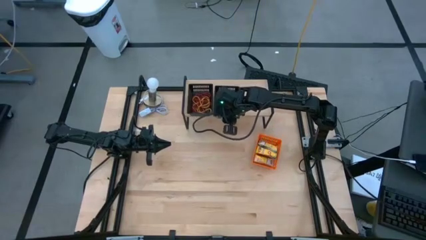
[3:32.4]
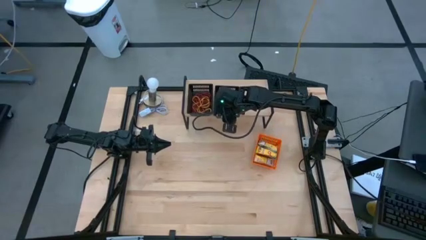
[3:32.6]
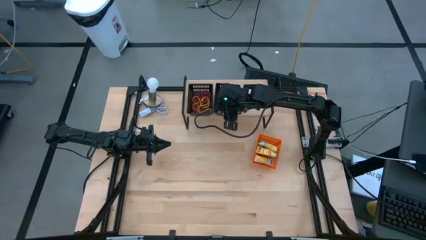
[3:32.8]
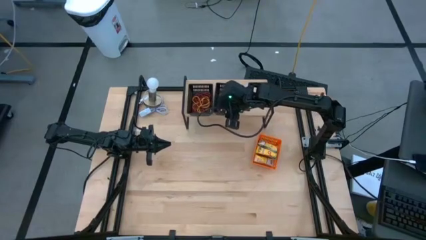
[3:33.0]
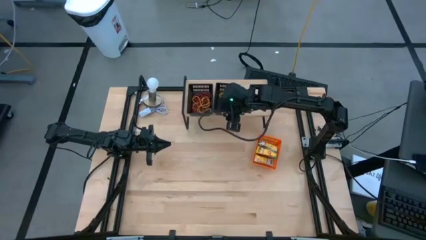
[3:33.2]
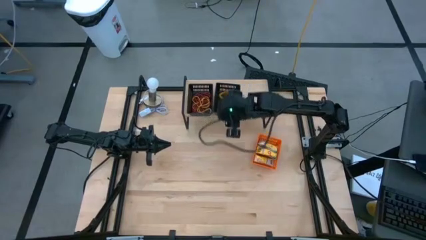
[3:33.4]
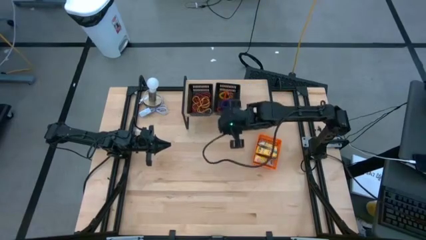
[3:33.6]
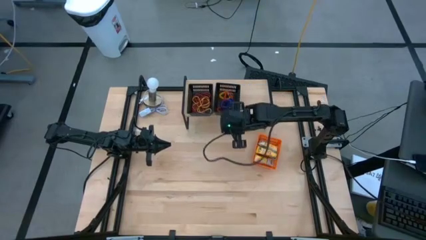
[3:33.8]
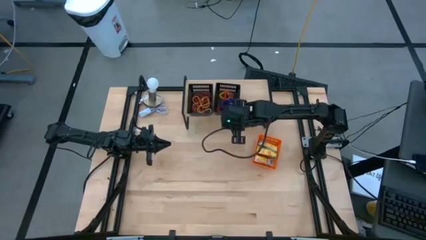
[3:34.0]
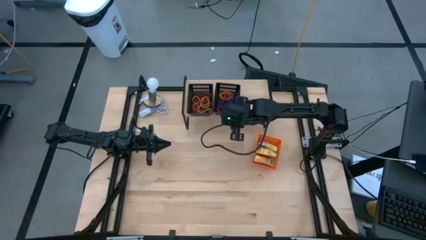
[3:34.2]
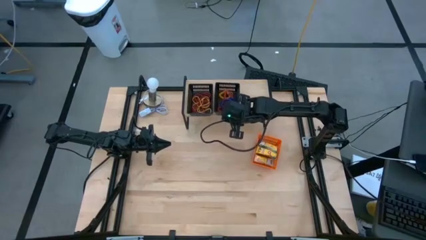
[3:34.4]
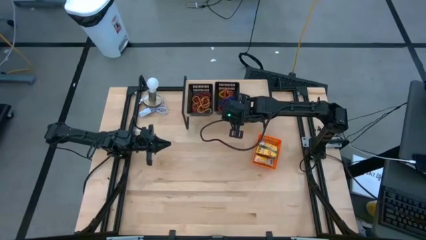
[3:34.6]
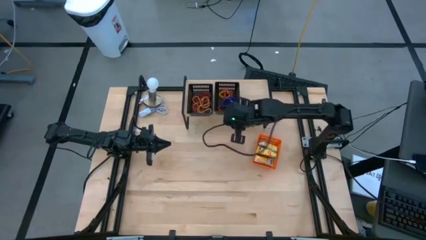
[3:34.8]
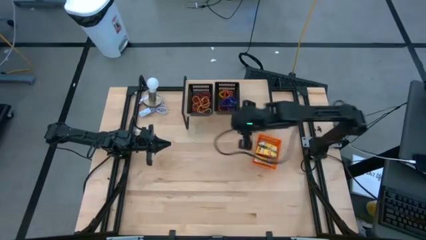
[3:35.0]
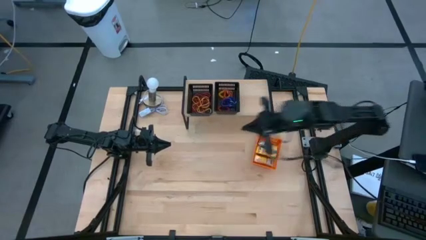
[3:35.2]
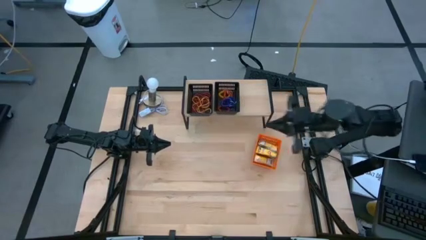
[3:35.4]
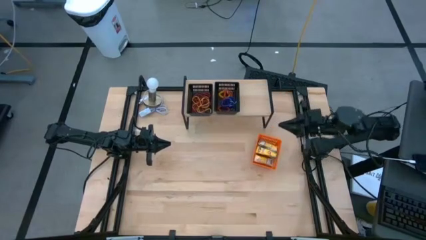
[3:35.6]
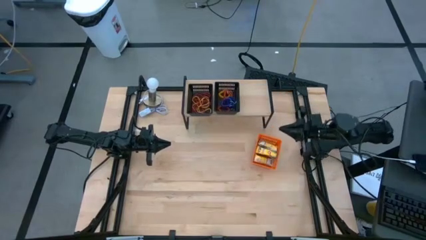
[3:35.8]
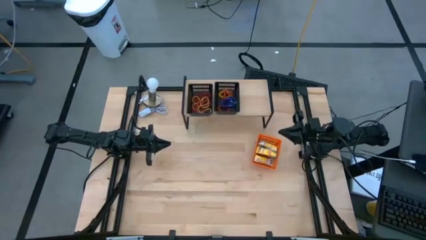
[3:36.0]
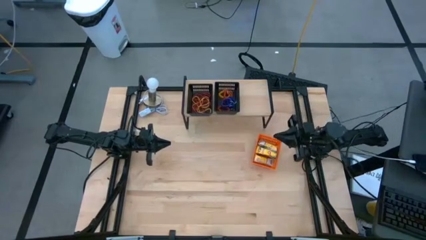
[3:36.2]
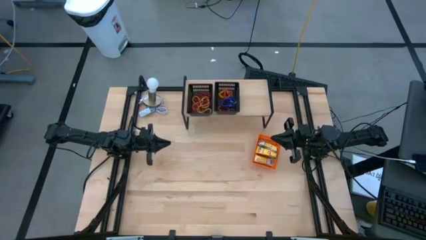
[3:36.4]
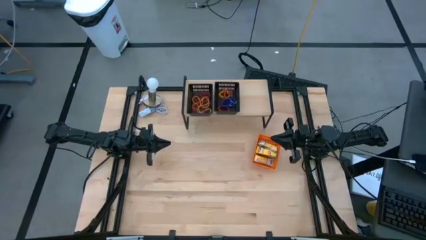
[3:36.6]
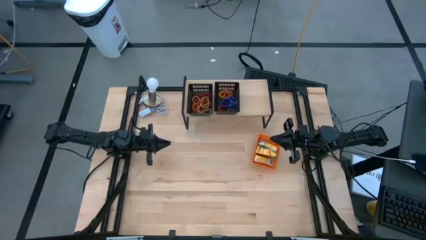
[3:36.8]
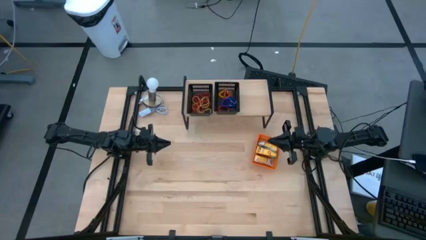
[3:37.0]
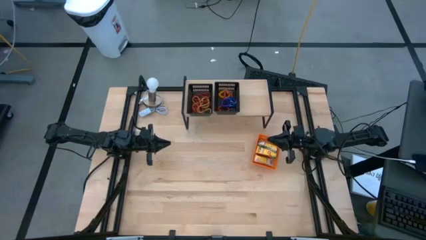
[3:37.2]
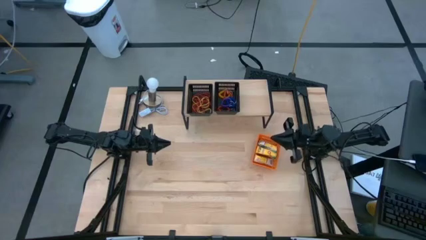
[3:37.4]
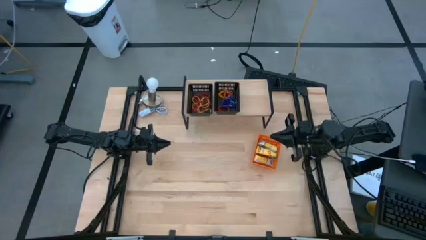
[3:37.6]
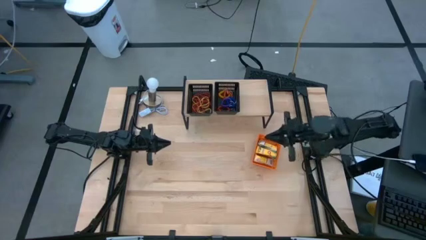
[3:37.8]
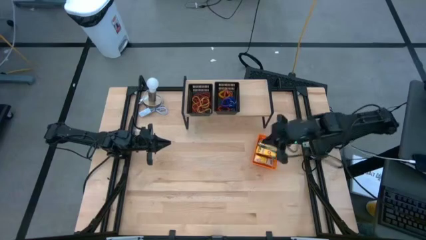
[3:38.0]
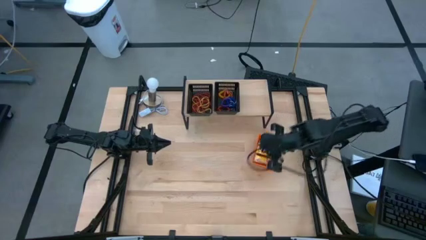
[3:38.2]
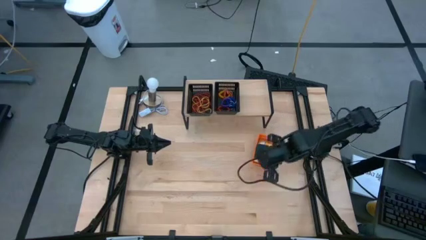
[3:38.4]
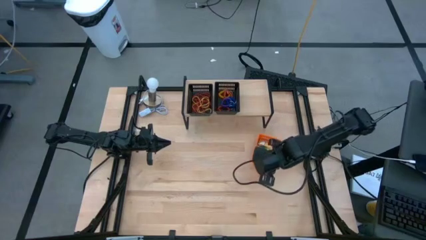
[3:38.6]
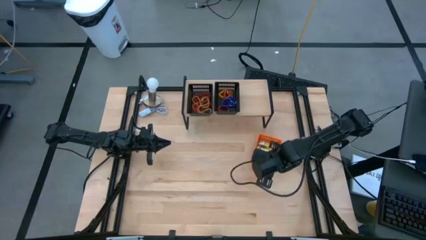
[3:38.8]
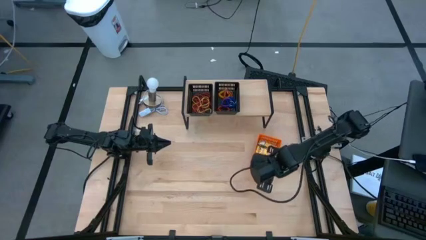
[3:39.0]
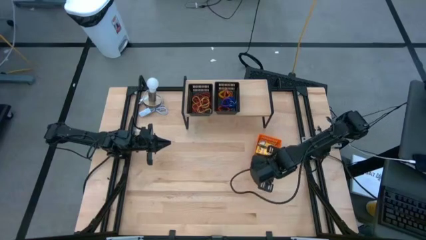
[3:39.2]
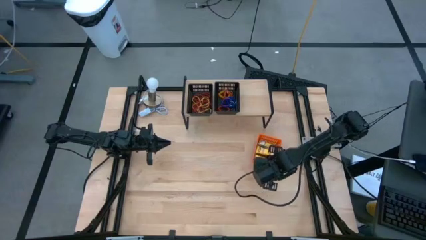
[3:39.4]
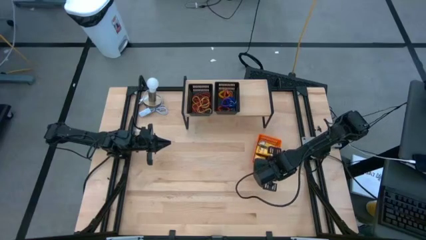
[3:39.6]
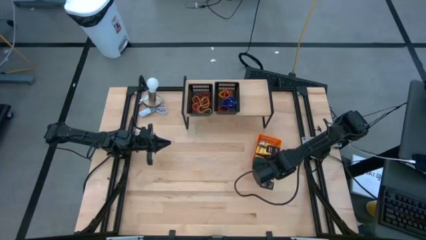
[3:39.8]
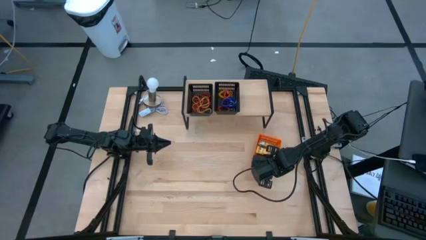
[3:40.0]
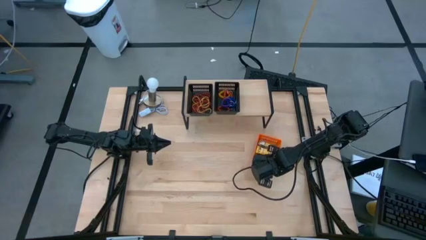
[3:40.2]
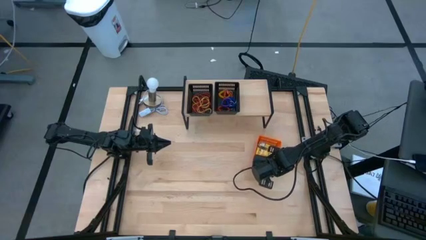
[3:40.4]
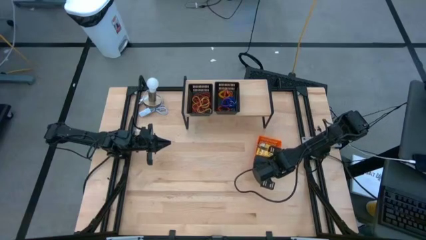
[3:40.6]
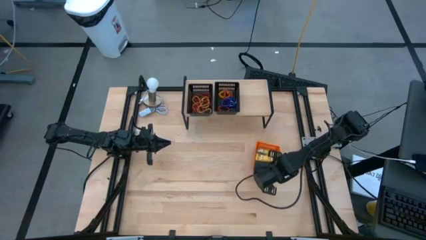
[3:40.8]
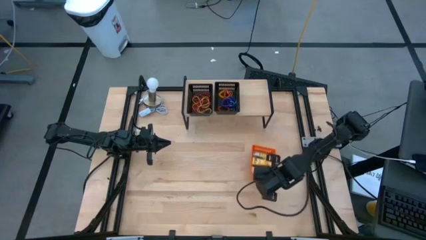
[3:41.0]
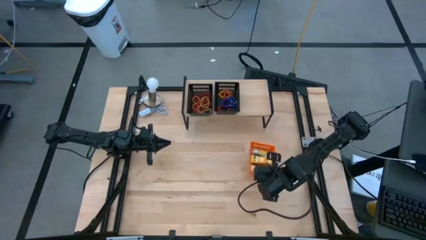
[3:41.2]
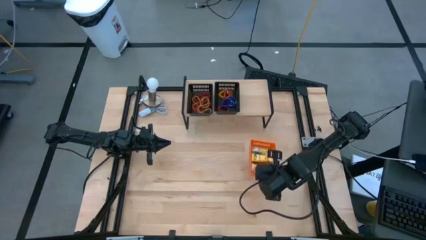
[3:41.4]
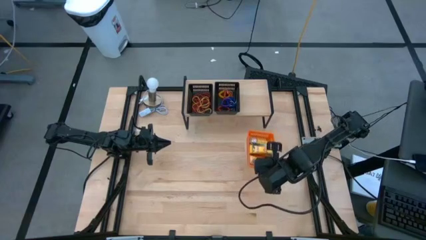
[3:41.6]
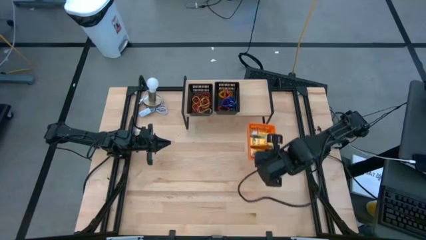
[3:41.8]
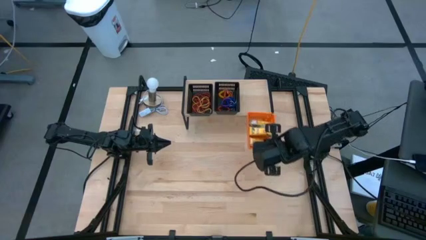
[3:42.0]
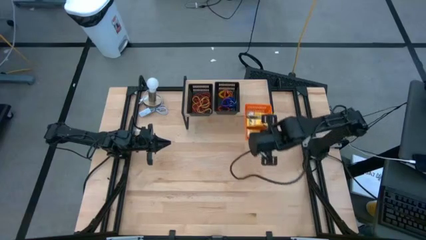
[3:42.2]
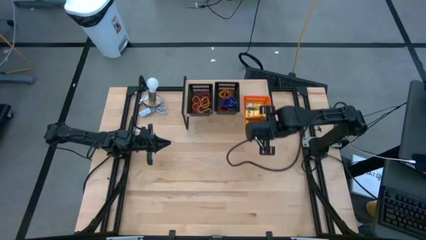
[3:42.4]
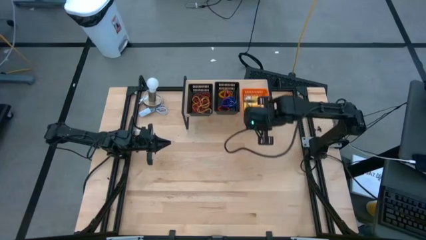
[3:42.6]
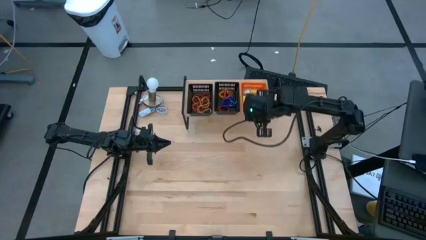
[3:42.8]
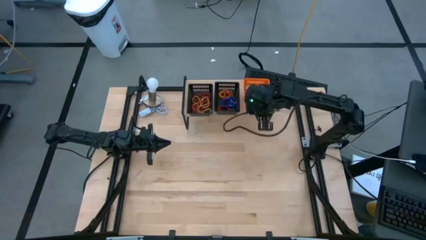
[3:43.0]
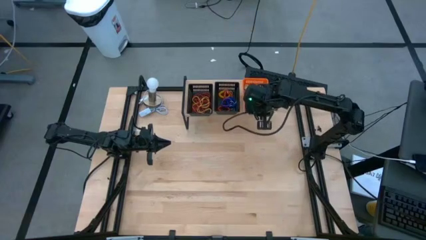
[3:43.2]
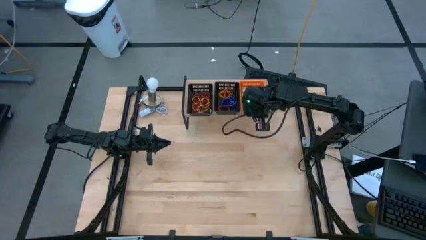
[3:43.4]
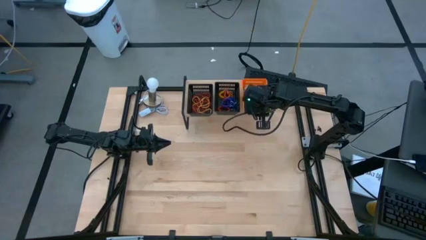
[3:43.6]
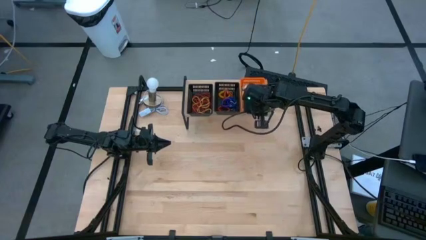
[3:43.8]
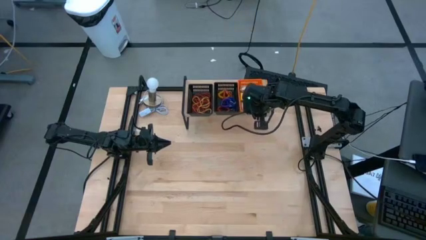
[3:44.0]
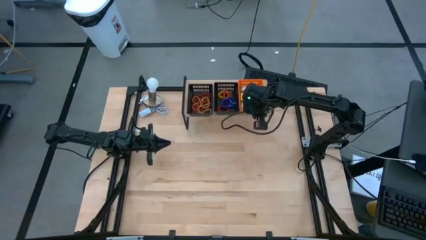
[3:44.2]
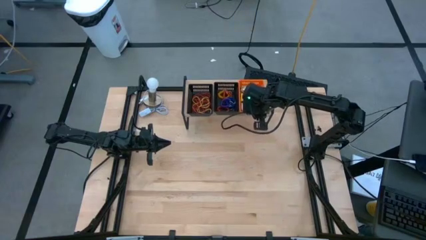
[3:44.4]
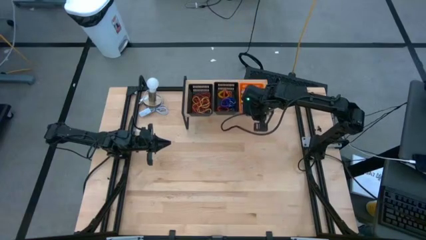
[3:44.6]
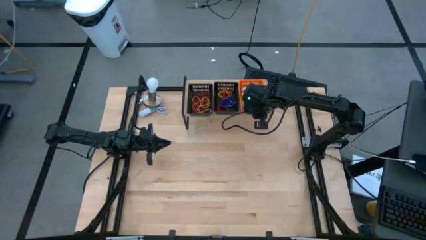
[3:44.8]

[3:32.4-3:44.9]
Task: Pick & Place Office Desk Supplies
Put the orange basket filled with crayon boxes on the shelf

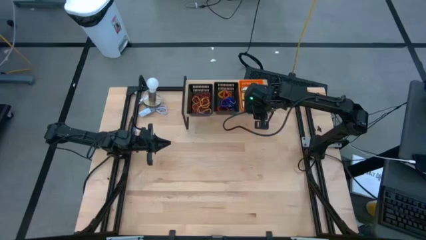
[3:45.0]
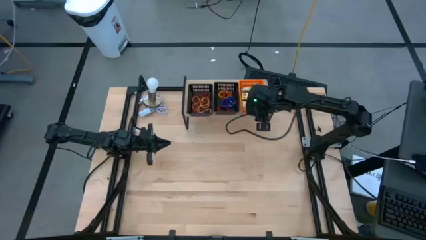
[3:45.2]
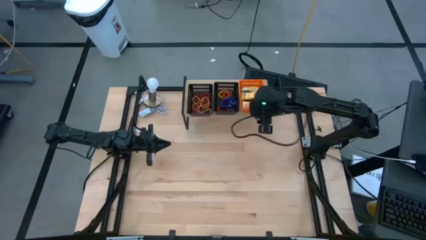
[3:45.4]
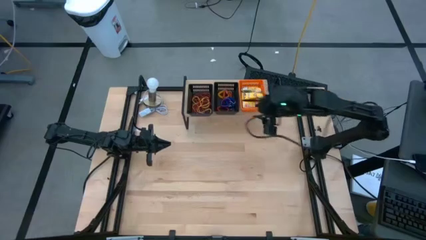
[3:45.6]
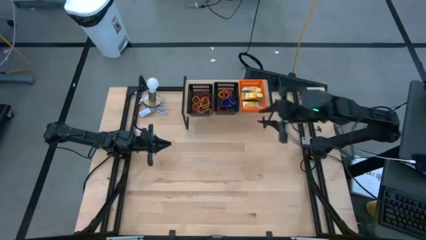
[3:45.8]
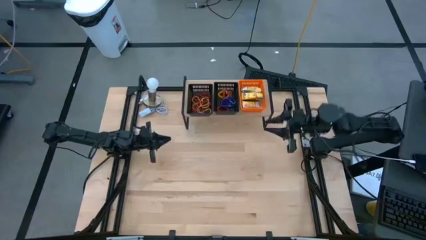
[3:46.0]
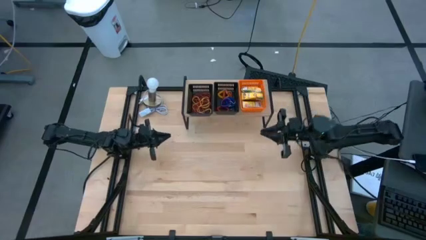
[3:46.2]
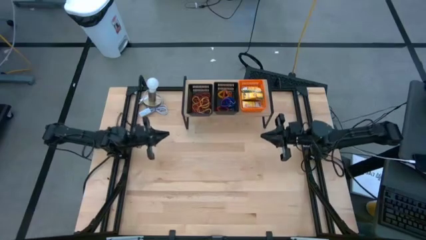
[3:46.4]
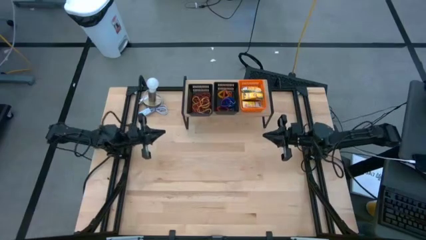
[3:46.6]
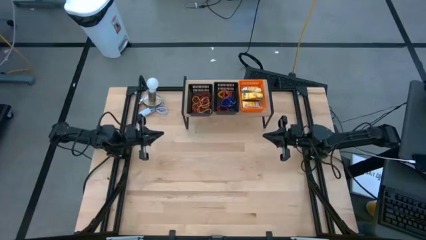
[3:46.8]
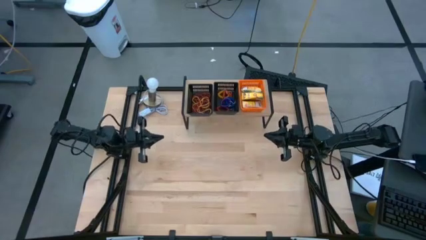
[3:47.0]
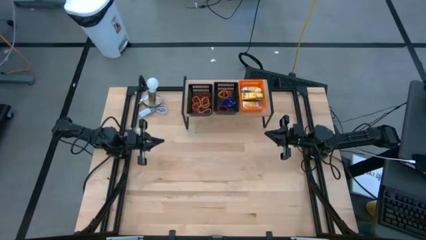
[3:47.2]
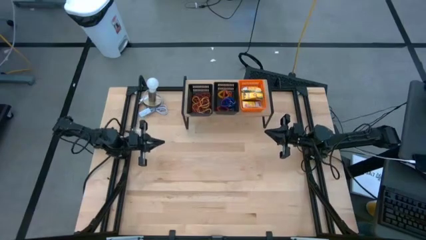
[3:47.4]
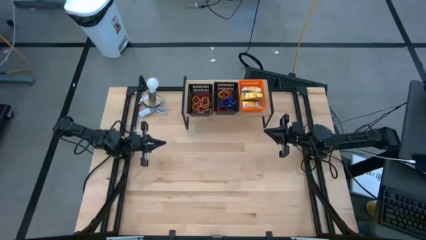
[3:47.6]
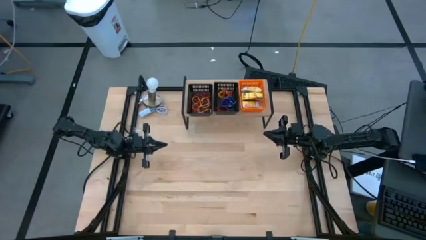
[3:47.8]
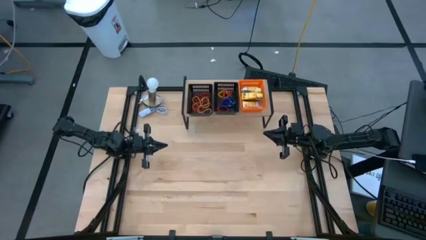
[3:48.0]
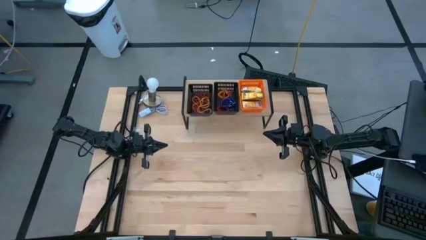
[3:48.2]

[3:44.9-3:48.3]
Return to Home Position

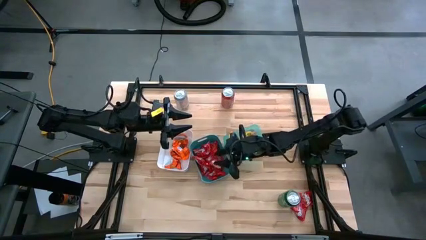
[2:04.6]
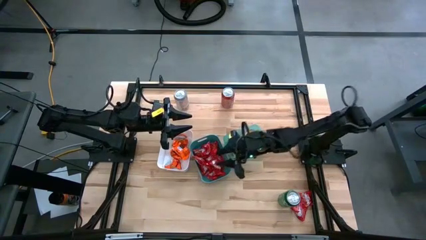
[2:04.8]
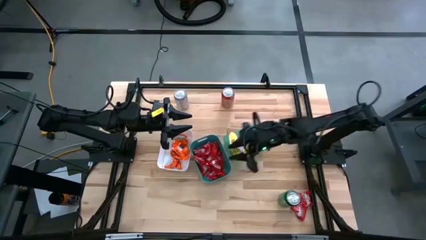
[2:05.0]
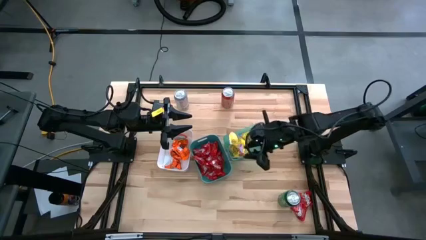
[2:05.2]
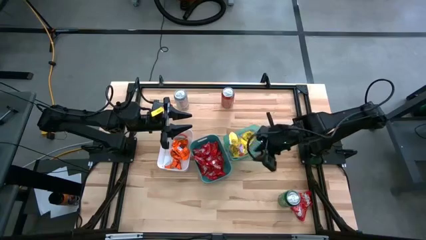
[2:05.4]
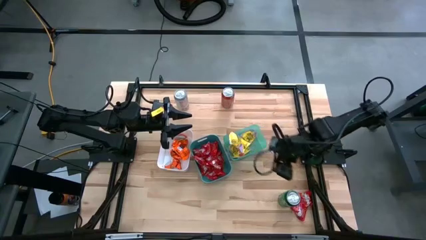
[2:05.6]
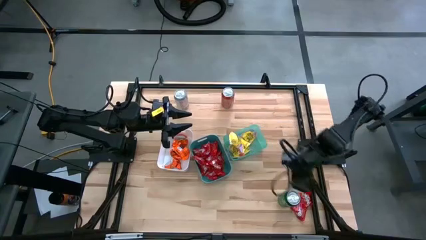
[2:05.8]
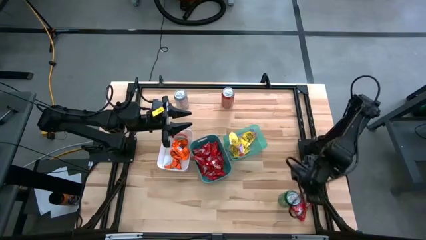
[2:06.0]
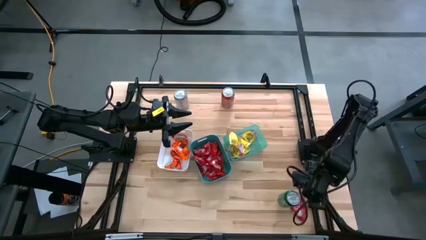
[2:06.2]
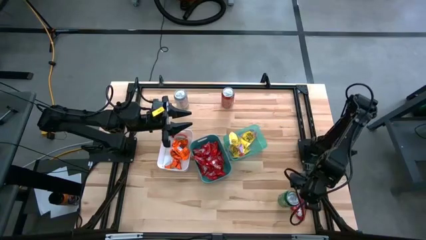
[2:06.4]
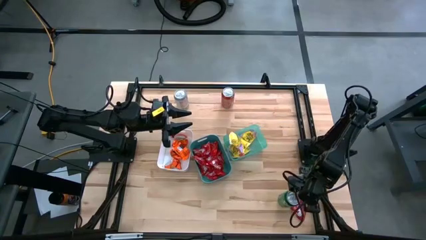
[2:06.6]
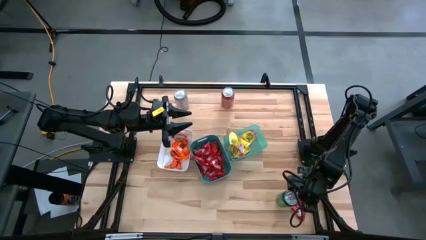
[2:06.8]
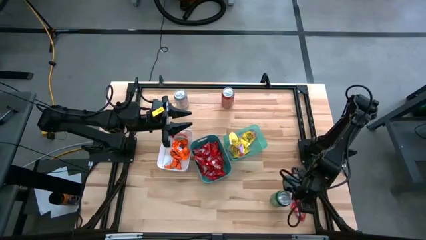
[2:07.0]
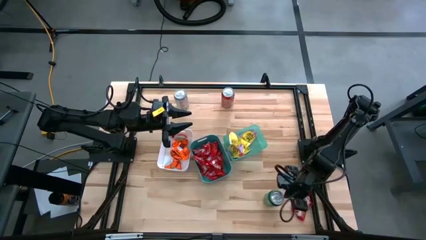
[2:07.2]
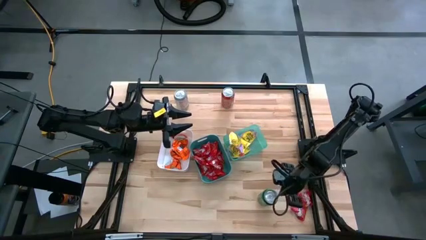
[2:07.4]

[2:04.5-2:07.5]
Task: Sort candy
Adjust the green soda can
